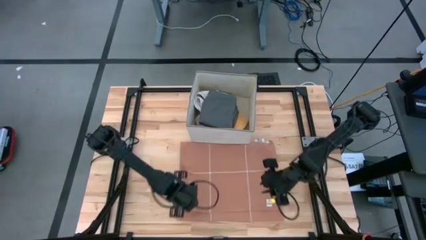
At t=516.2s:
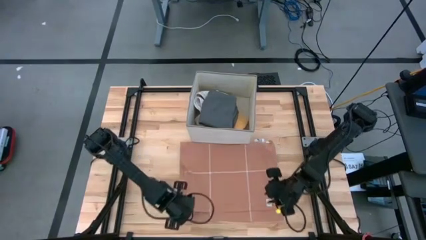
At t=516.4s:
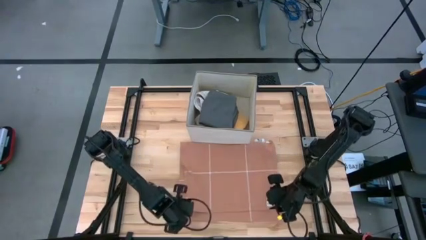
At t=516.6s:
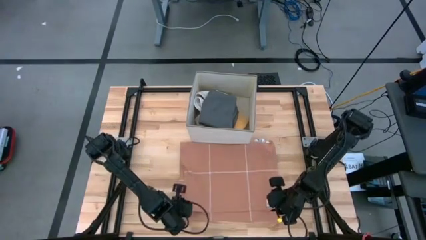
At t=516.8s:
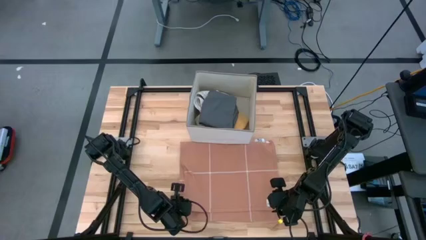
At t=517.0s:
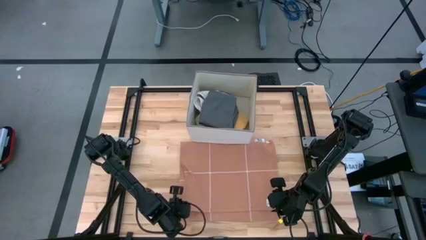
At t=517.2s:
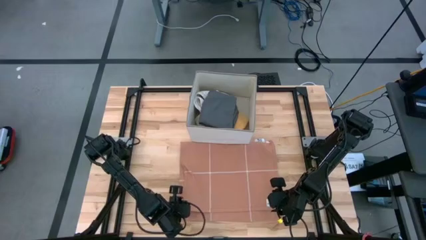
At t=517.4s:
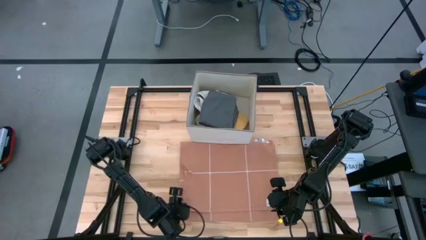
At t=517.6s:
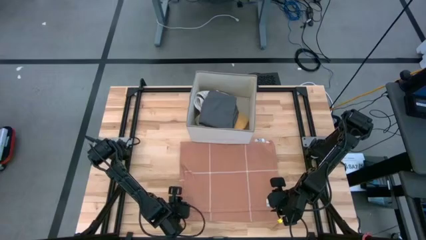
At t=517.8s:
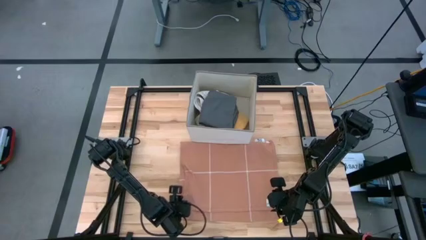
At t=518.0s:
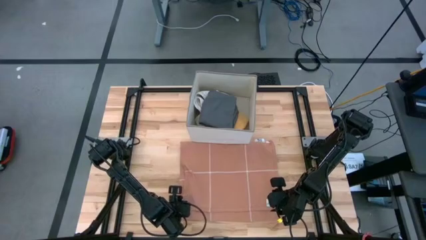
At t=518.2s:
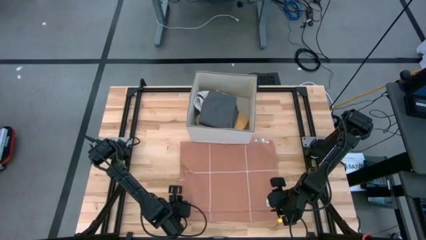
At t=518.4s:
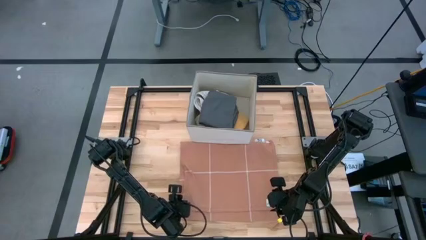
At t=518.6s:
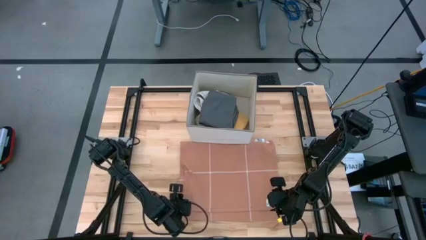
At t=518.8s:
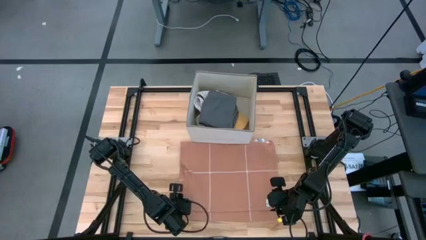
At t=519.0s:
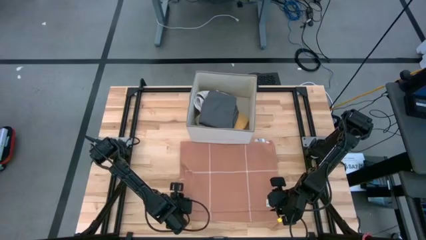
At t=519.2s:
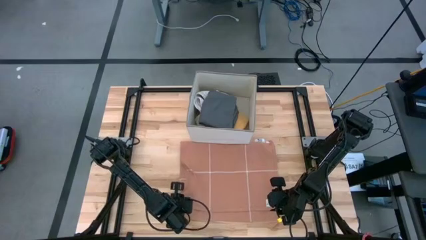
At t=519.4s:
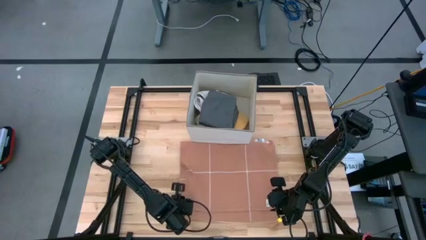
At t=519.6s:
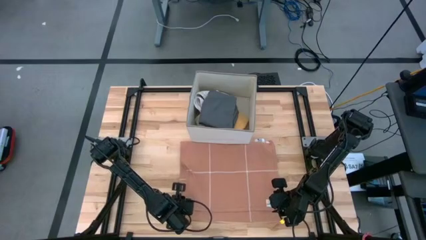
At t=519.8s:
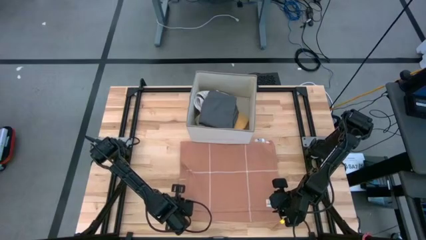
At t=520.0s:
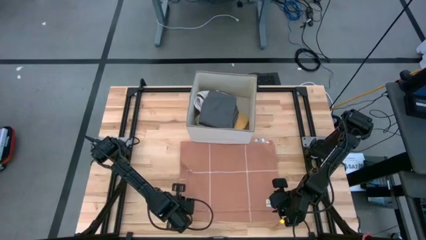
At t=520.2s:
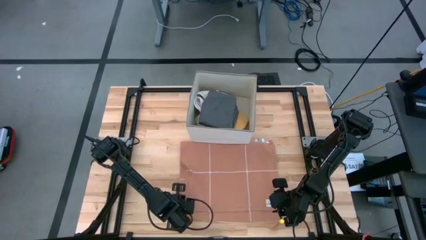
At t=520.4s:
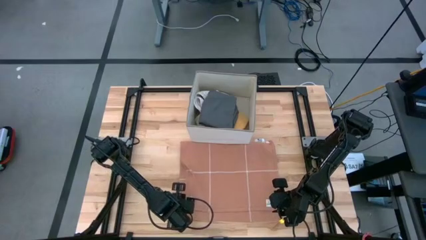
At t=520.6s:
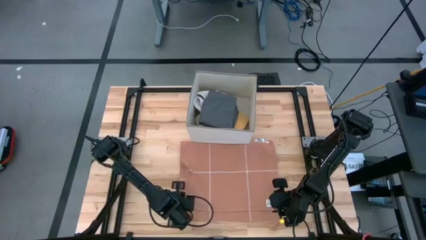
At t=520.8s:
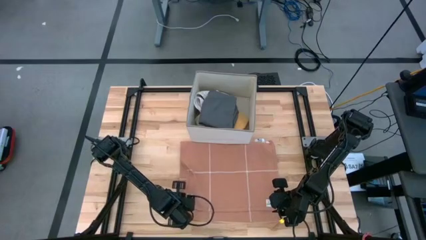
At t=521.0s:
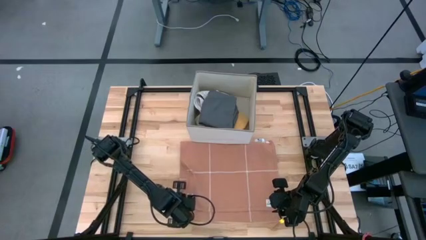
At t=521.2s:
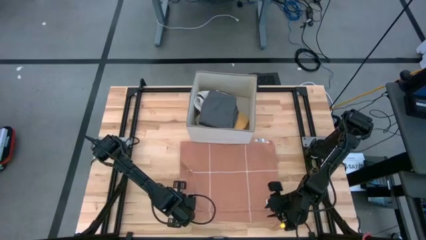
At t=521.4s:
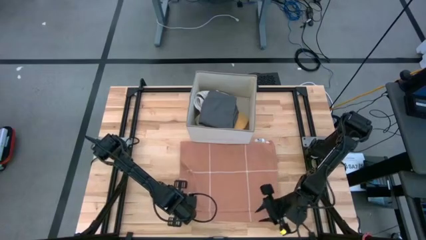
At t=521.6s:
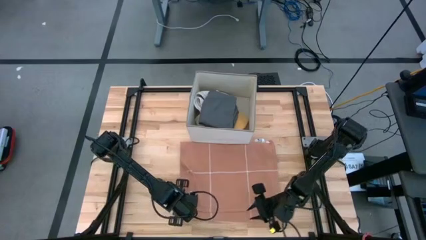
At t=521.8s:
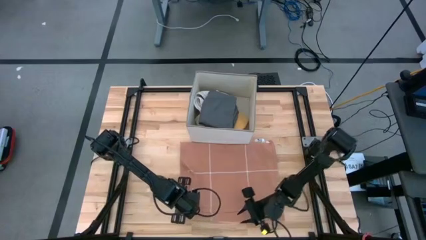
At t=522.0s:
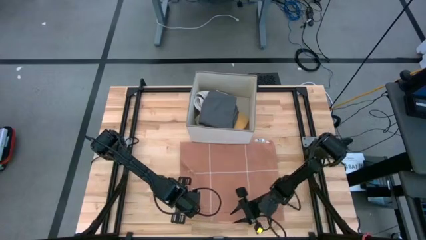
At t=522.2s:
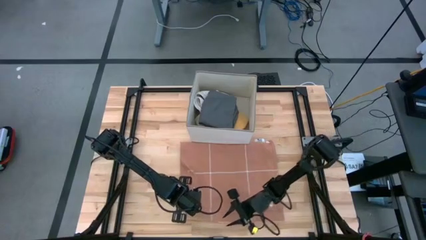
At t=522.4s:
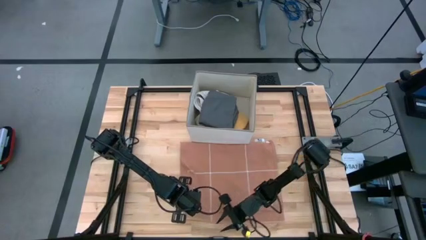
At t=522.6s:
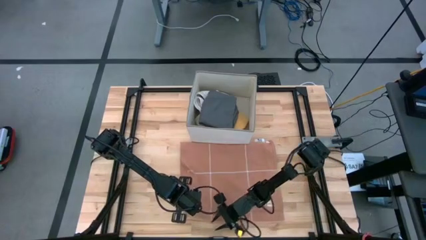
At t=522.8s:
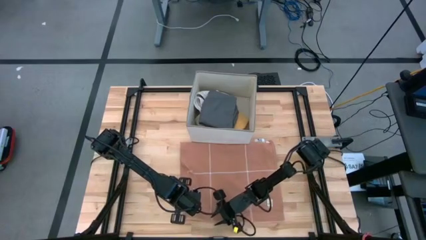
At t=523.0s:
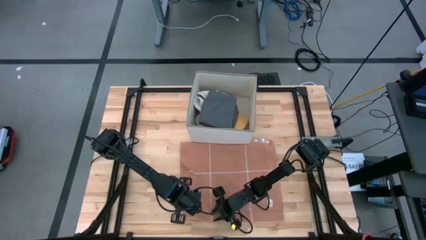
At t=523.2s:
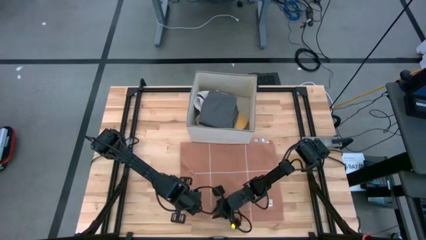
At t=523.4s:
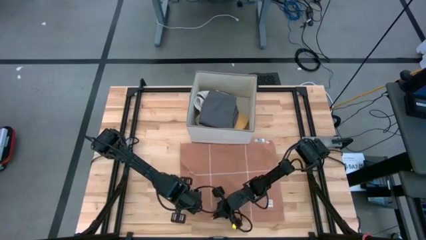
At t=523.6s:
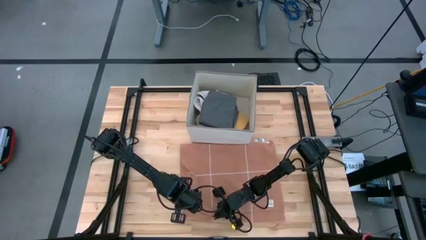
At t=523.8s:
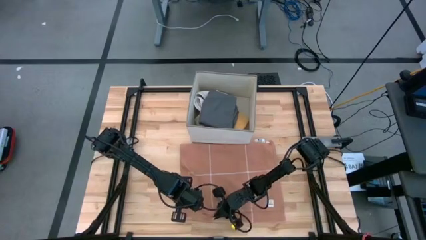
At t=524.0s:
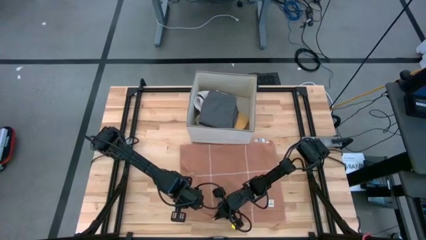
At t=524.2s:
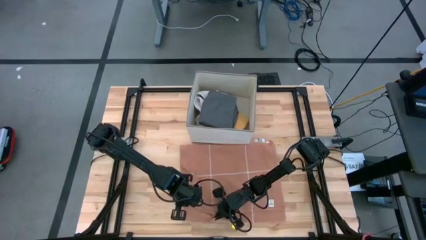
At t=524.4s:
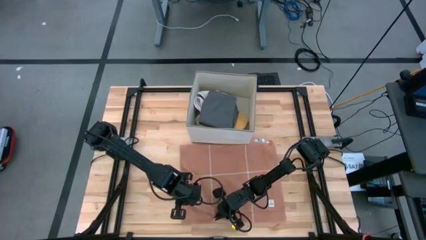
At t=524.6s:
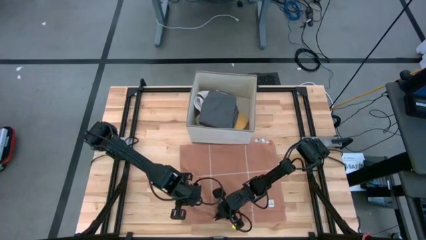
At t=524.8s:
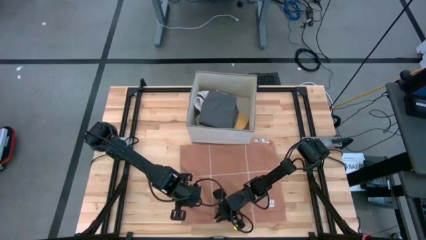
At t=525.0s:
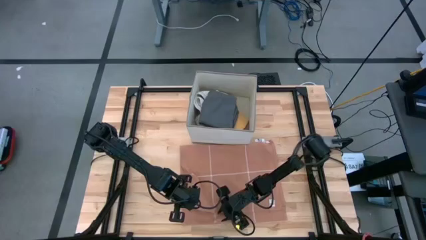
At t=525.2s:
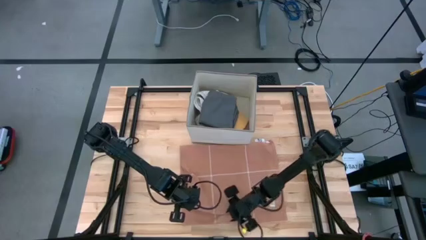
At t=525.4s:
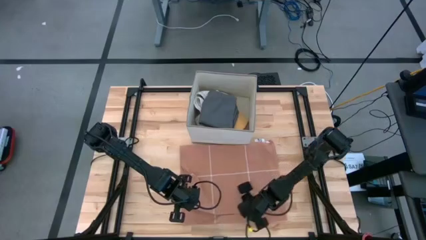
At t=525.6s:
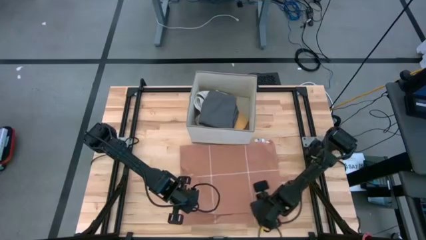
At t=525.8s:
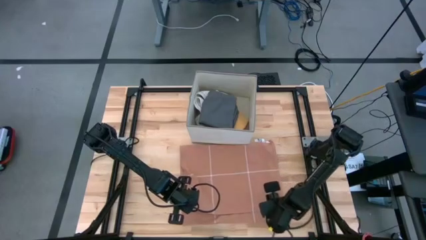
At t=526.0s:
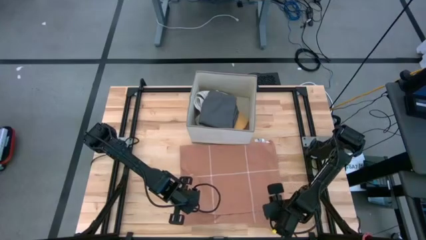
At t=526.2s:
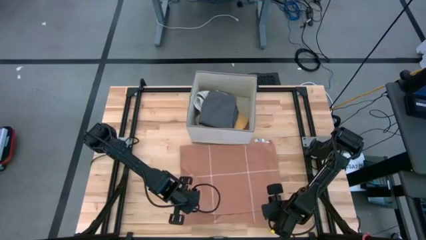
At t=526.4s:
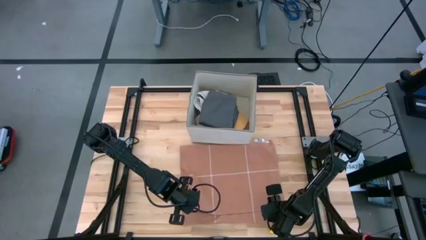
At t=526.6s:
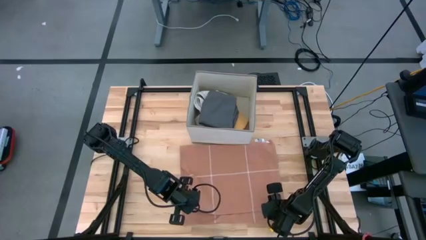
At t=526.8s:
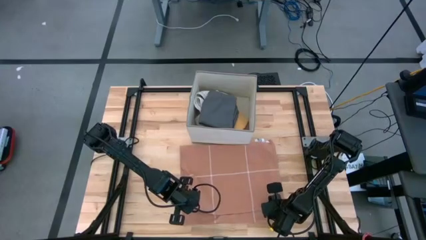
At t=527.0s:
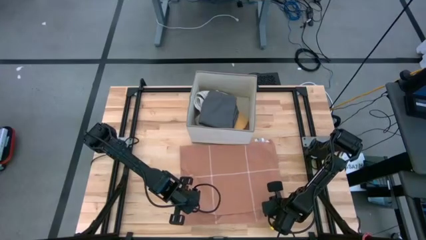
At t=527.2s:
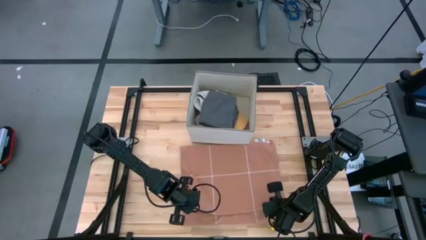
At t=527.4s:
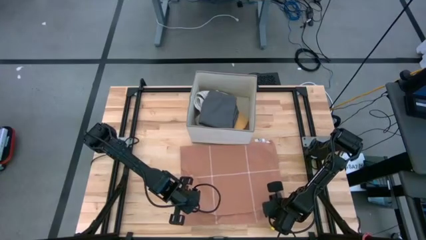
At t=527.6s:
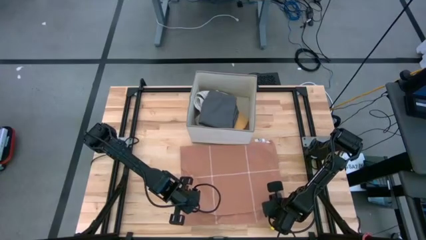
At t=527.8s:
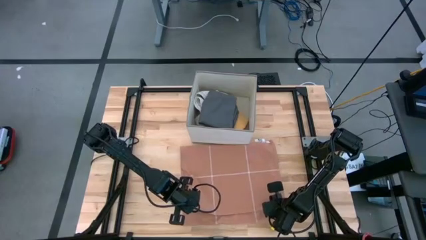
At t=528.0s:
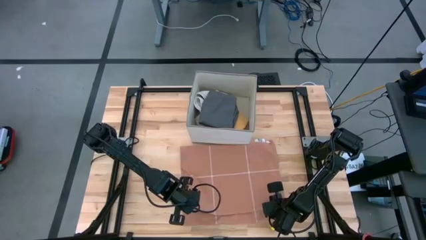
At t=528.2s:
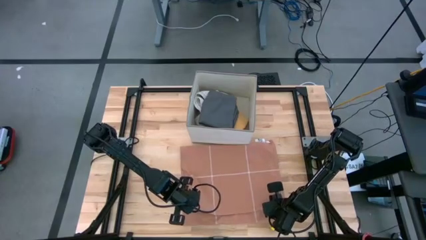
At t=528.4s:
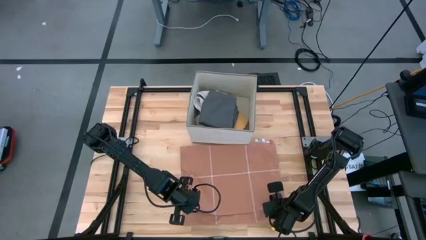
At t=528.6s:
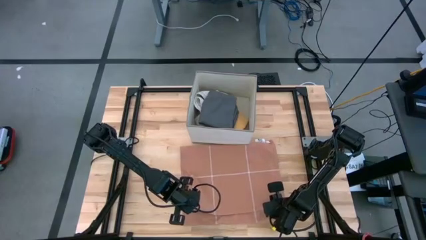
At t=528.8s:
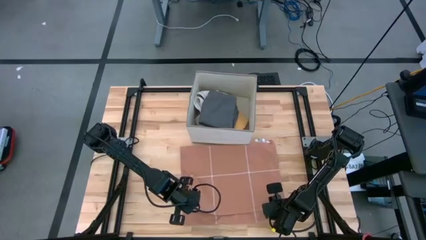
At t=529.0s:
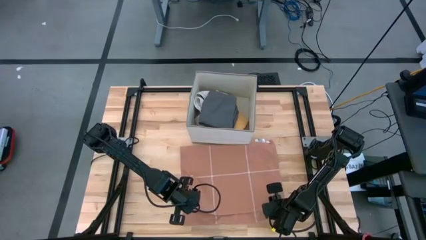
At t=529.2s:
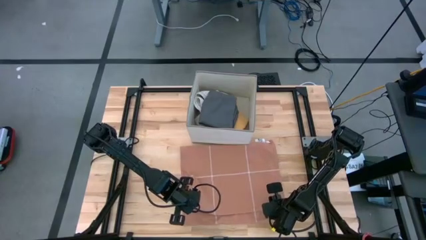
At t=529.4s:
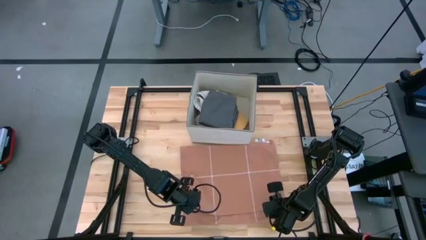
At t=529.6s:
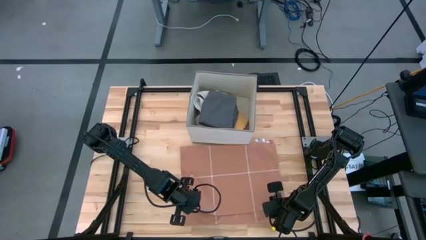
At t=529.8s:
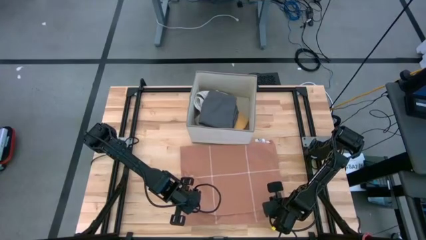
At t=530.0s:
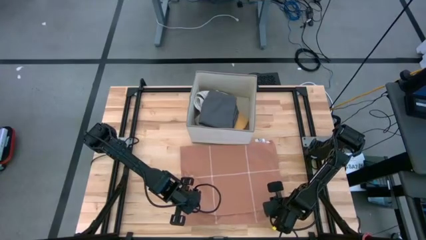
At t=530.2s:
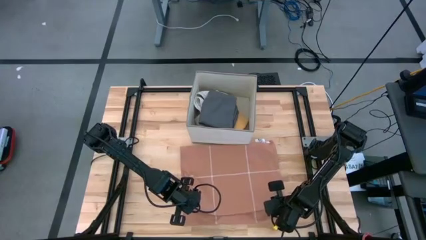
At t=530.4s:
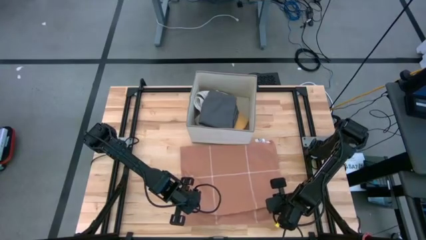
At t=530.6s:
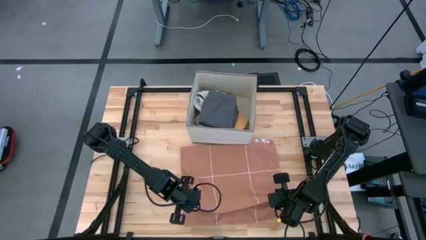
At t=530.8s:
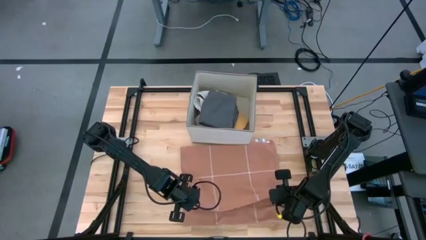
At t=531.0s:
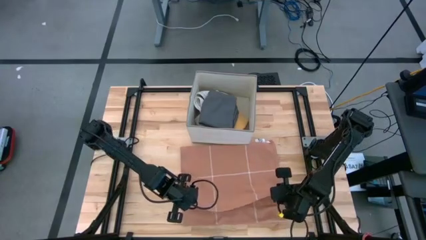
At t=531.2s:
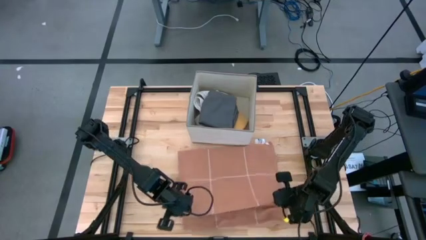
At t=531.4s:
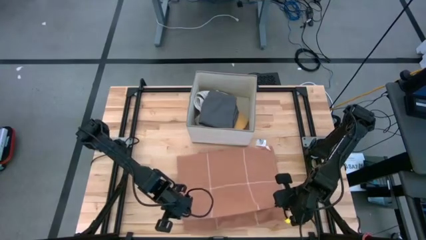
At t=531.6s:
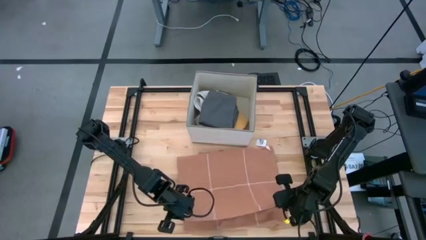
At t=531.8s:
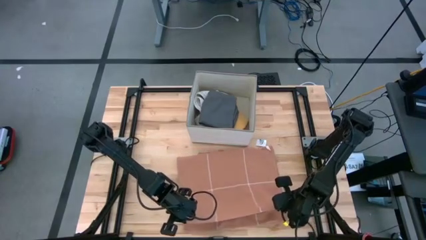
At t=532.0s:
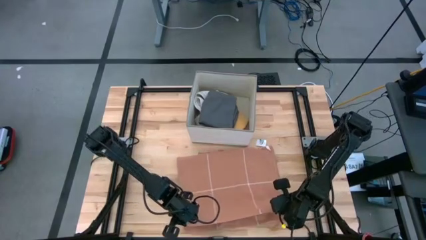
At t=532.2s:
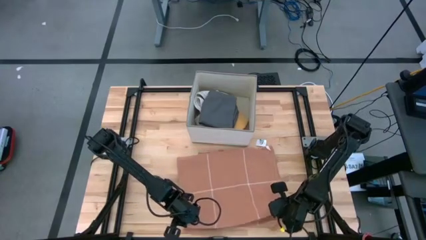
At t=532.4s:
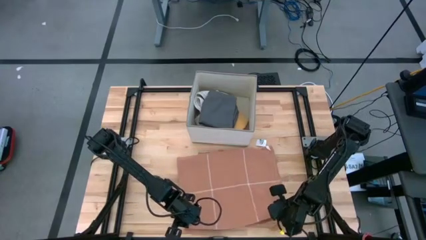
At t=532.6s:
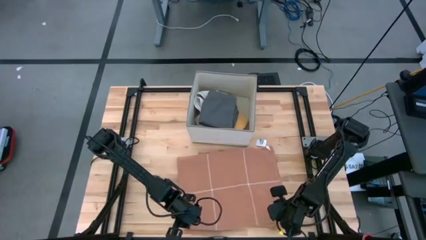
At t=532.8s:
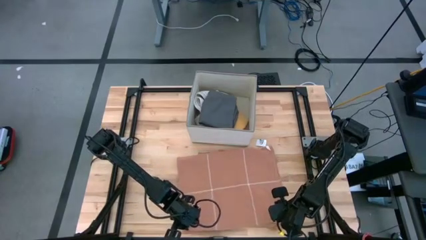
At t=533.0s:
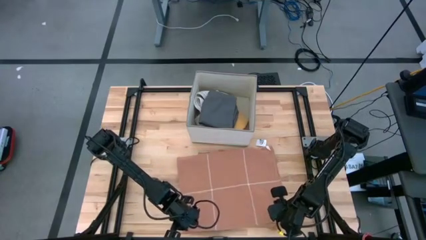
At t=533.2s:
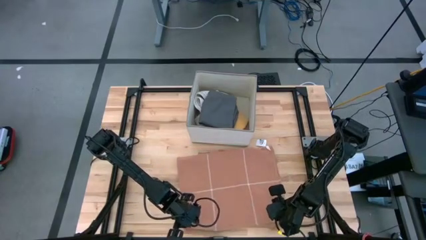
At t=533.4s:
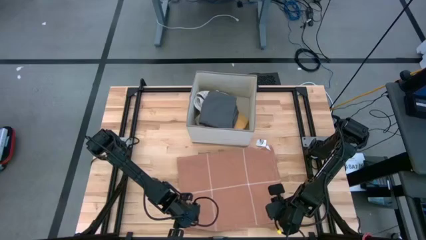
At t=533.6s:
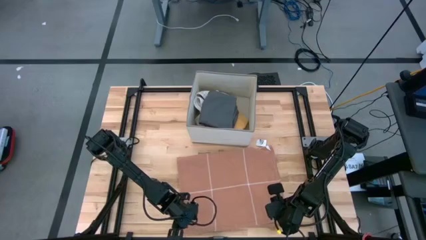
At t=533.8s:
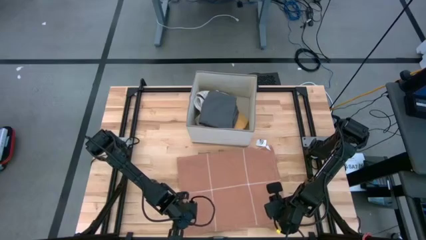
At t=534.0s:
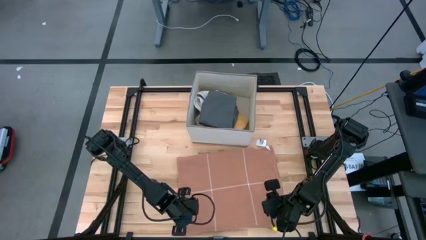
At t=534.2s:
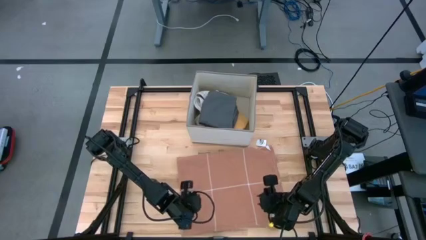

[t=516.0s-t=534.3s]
Task: Fold towel
Fold the brown towel with white checkered lines
